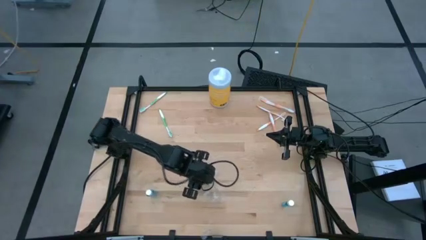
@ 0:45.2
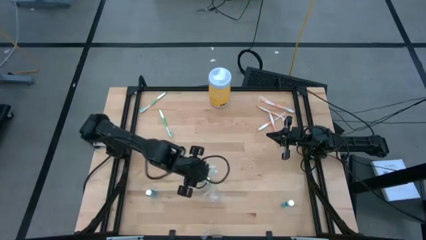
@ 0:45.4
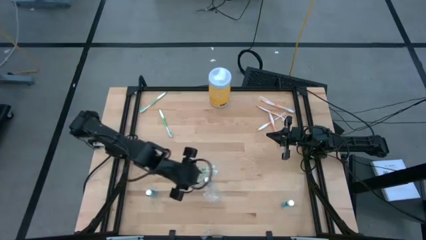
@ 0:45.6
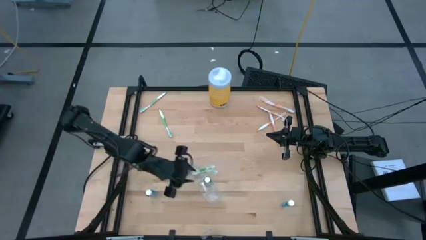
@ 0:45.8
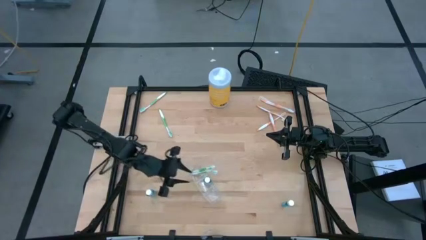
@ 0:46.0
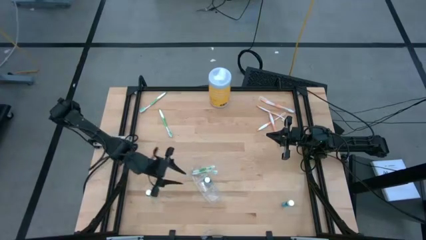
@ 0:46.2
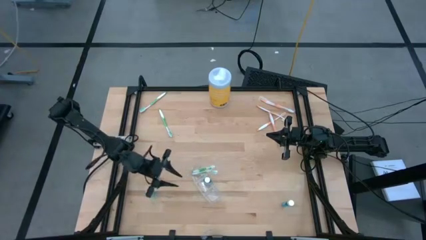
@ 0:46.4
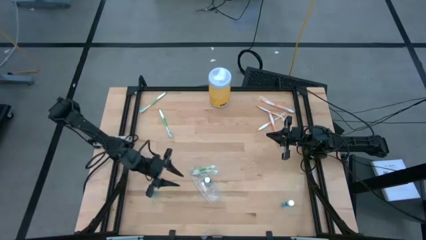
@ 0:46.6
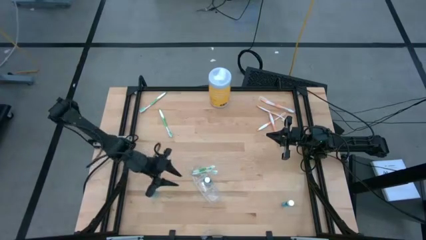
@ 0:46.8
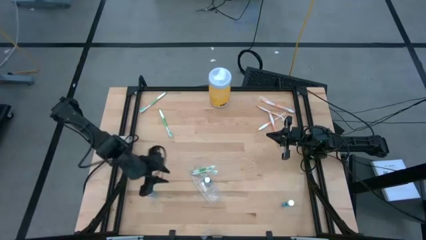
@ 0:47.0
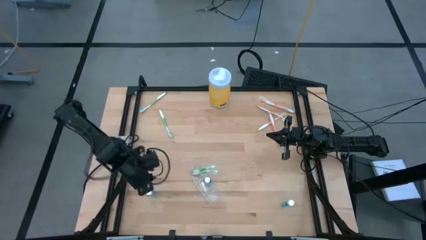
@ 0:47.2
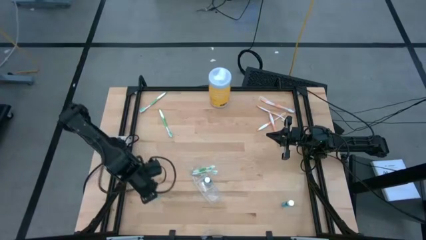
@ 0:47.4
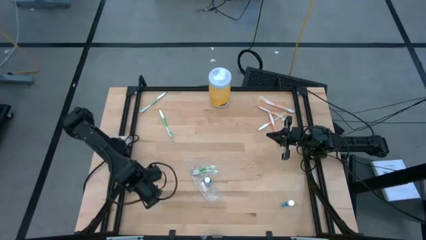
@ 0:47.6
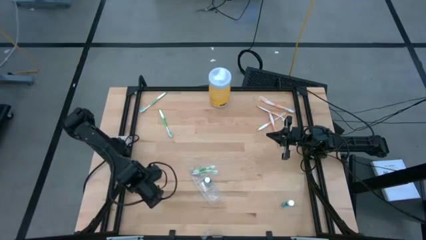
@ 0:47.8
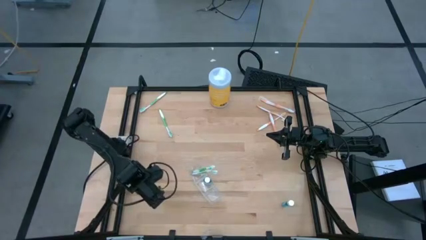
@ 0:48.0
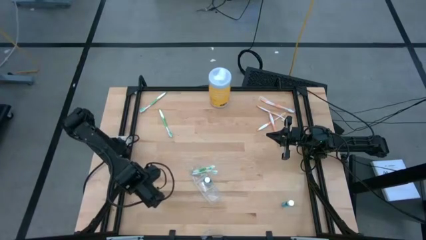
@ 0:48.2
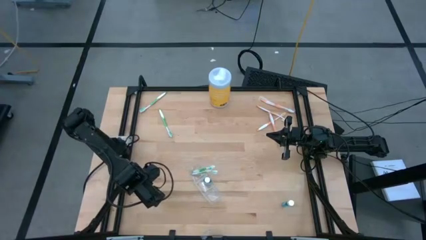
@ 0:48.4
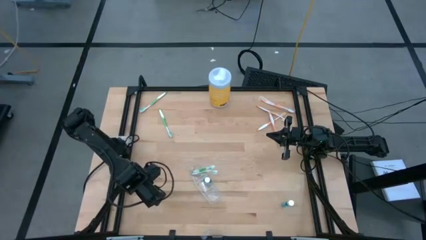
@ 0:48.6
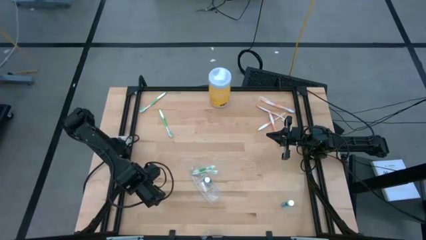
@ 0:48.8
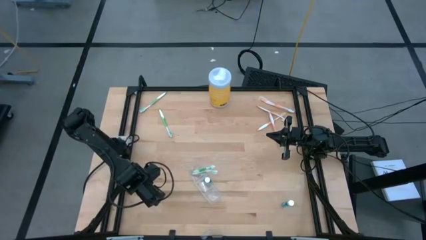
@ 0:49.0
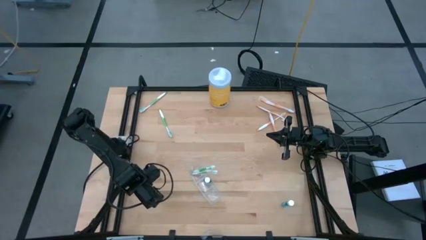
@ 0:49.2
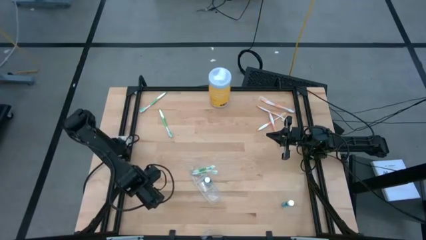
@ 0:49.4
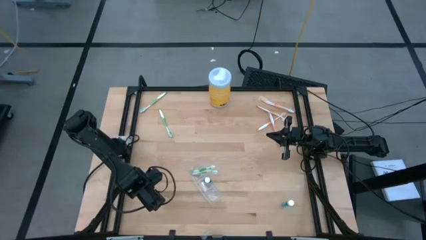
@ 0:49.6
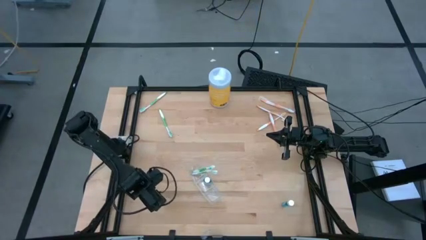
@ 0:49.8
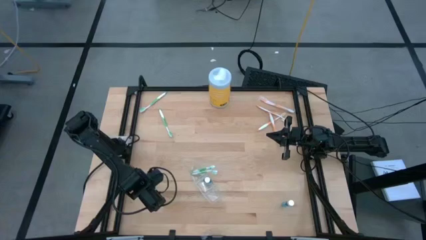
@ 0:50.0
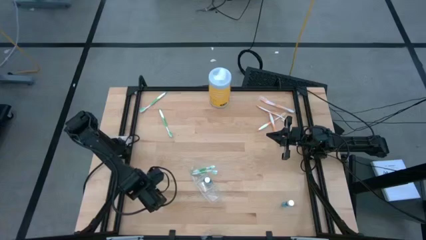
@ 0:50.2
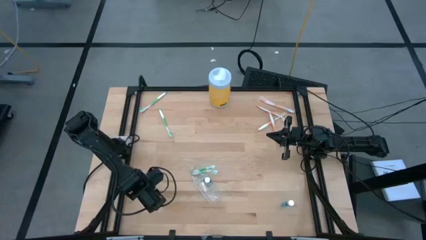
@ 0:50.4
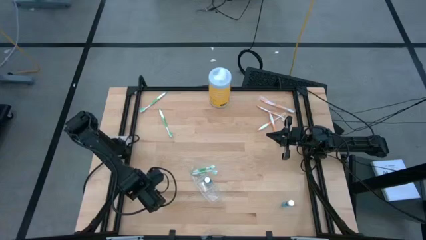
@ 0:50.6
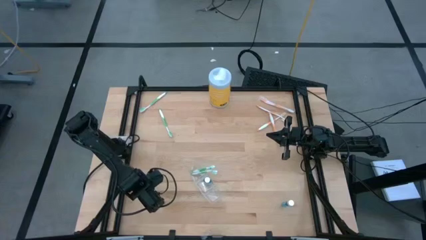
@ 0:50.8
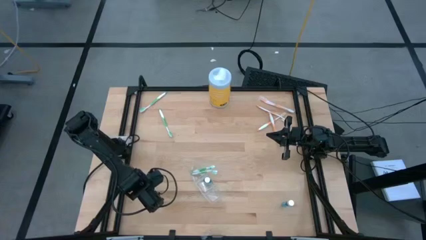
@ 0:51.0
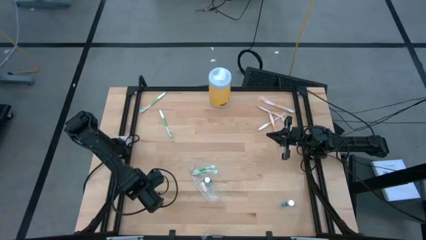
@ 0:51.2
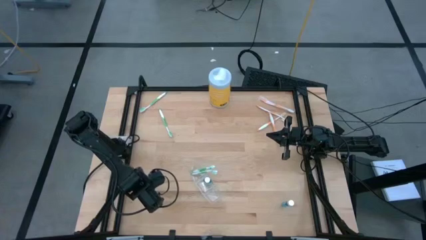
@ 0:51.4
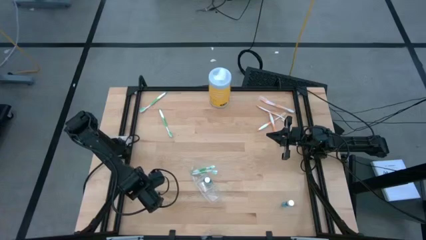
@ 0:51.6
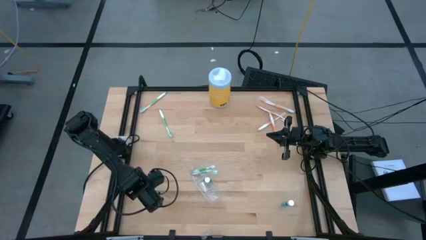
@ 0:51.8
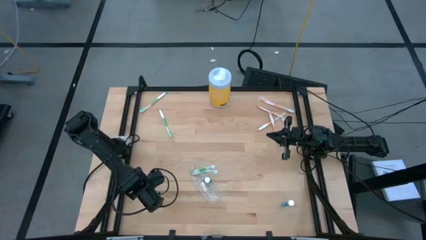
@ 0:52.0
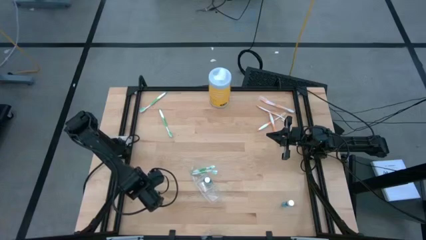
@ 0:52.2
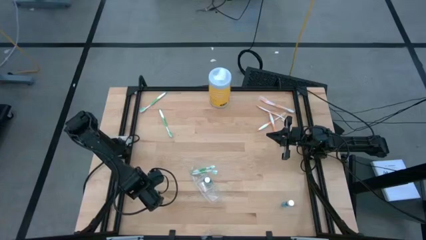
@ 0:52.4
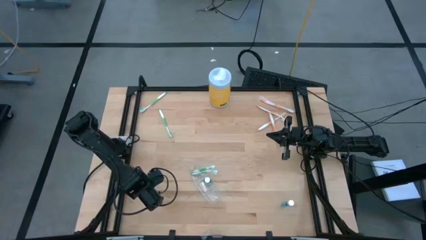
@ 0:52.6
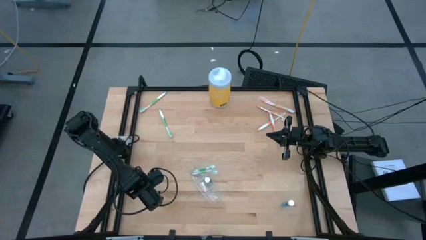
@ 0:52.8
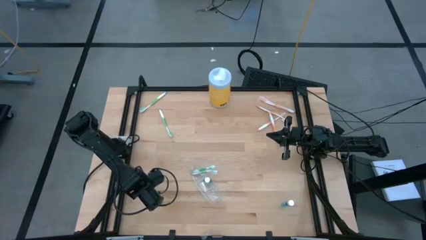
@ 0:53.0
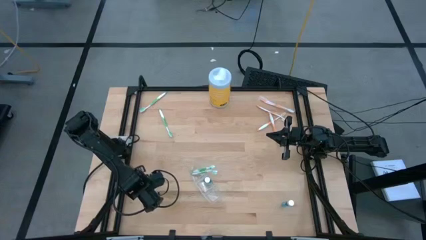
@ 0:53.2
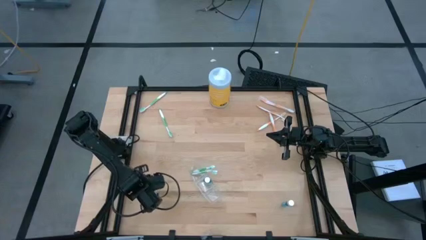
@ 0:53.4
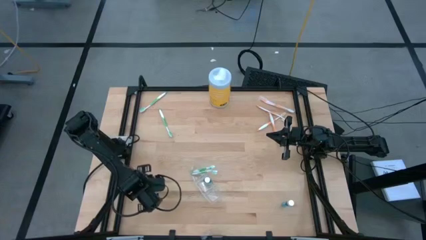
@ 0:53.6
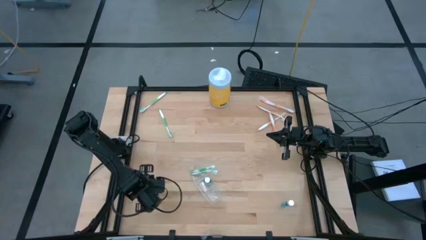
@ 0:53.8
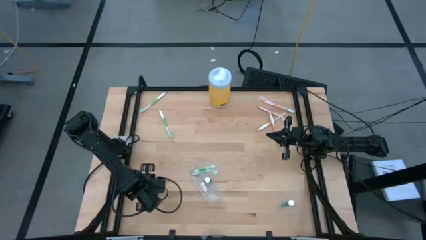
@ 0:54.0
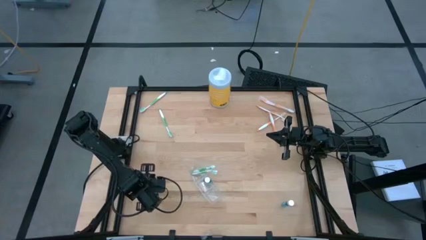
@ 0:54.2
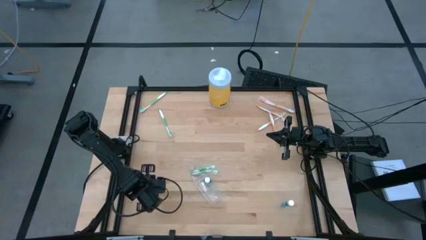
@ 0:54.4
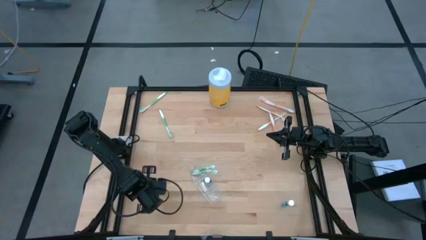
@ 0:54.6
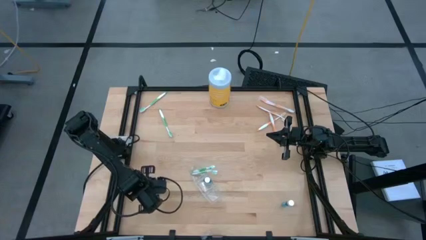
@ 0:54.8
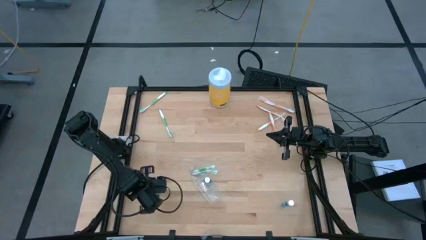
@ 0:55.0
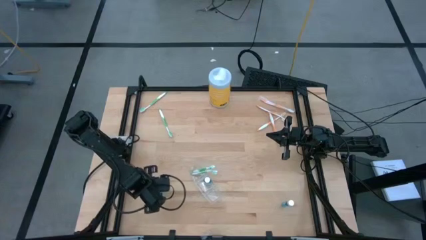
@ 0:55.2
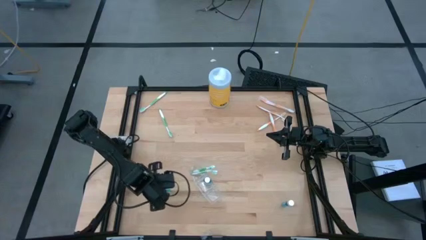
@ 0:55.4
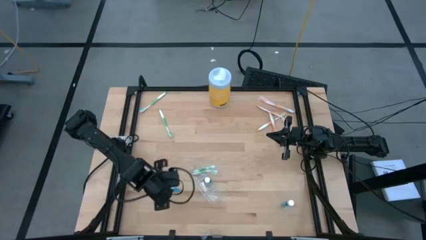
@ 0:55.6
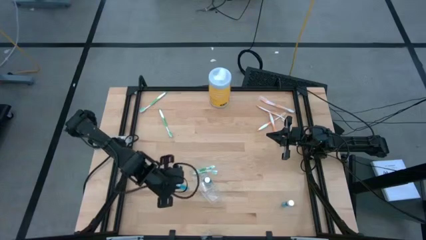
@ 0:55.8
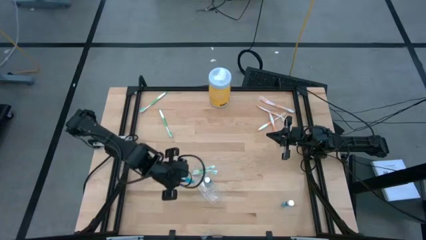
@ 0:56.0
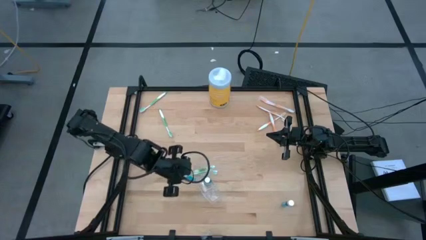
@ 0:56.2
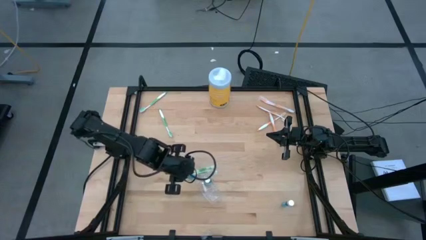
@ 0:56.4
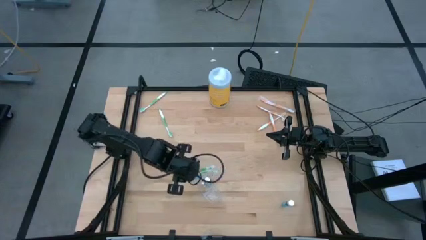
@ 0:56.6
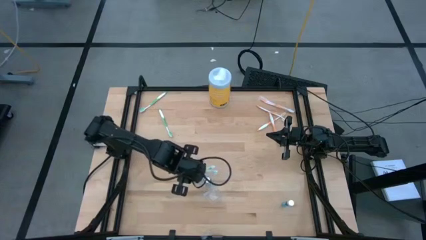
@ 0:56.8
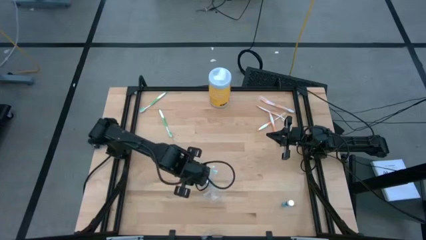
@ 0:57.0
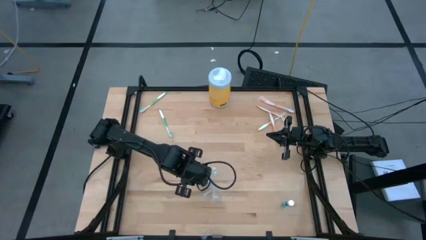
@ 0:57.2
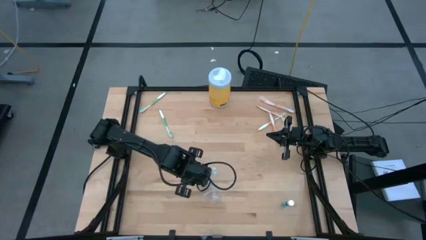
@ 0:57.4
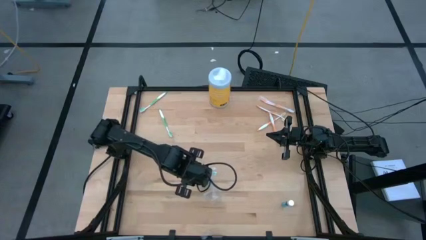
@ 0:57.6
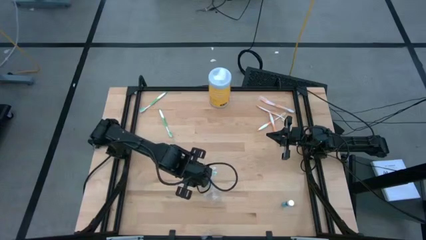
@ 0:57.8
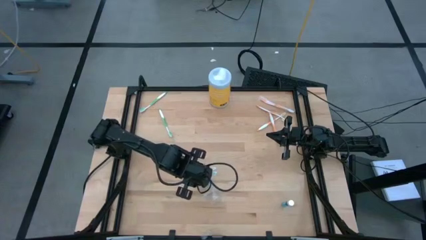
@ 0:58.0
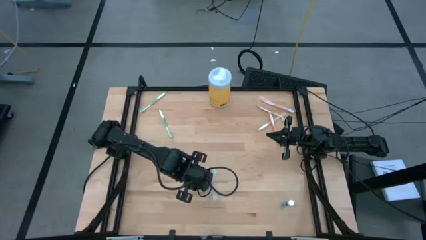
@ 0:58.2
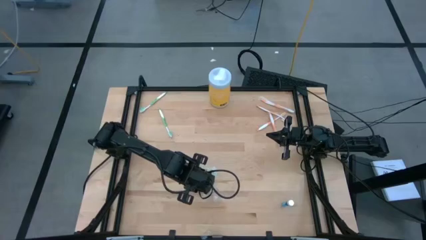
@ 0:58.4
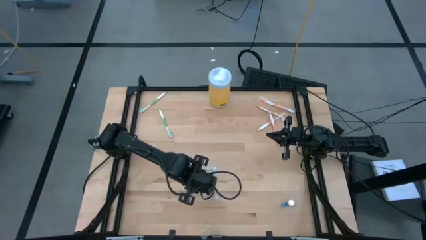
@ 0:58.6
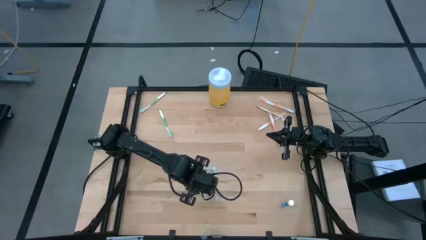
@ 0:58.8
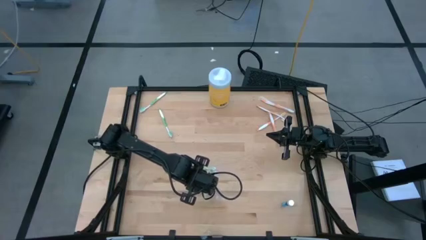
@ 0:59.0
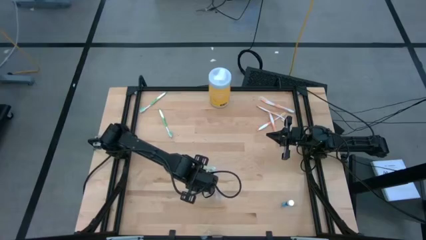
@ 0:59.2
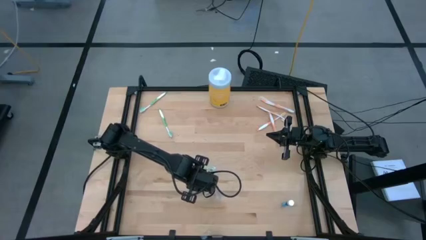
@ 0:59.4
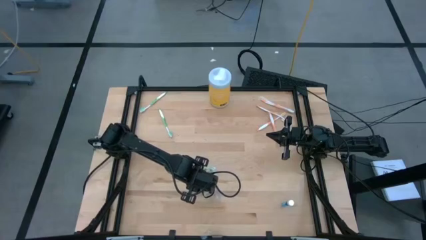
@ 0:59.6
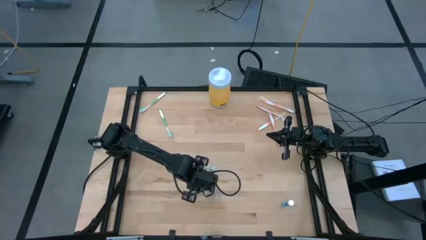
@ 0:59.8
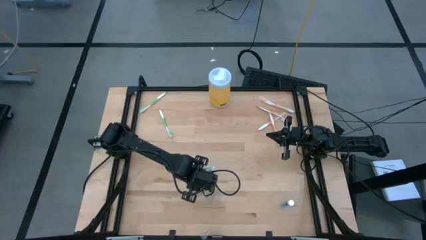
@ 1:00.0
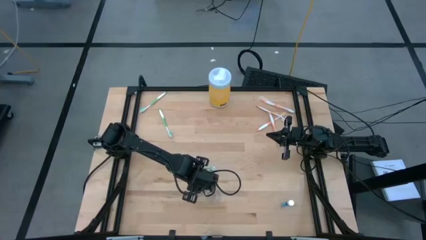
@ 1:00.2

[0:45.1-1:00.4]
Task: Pick & Place toothbrushing station
Put the blue mouthwash into the transparent organizer
